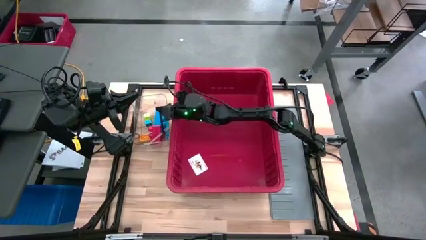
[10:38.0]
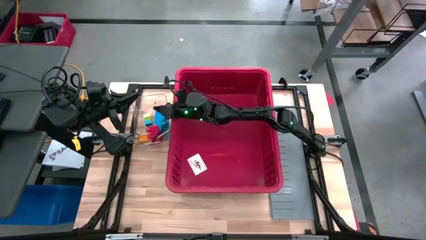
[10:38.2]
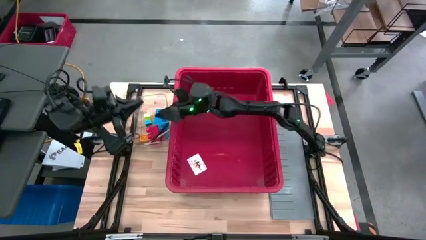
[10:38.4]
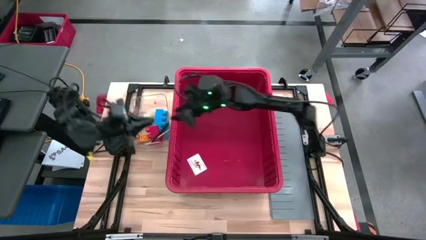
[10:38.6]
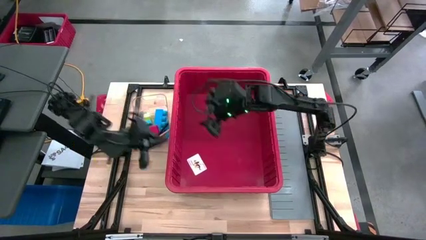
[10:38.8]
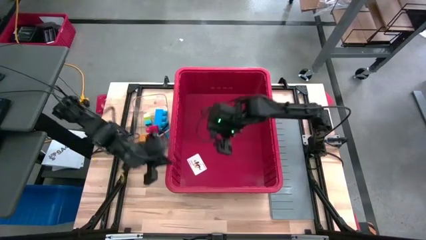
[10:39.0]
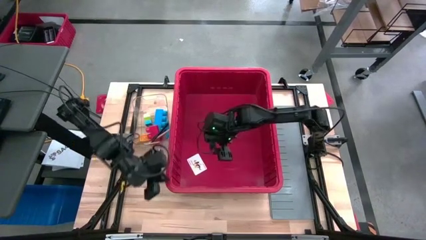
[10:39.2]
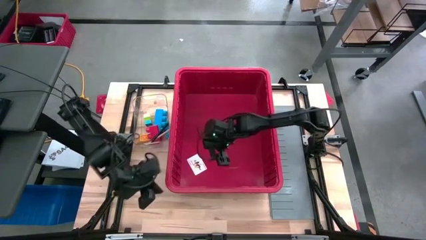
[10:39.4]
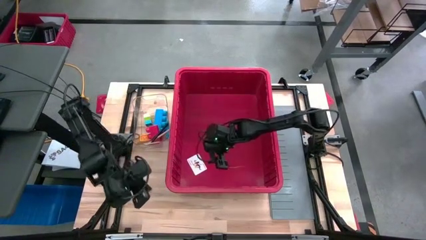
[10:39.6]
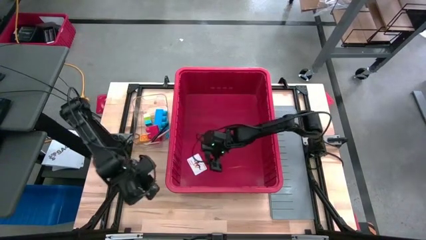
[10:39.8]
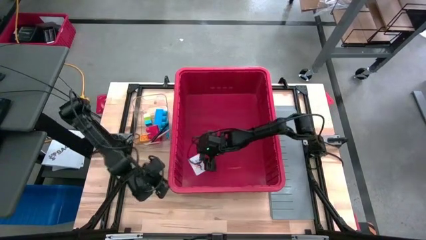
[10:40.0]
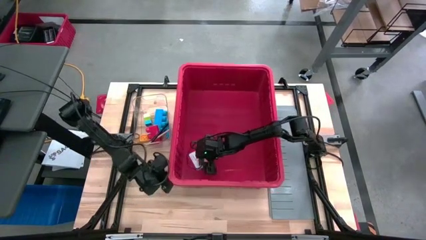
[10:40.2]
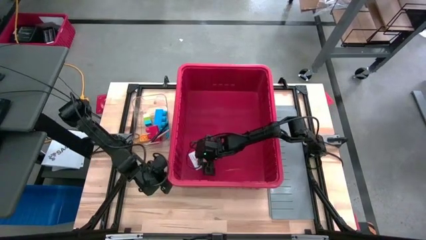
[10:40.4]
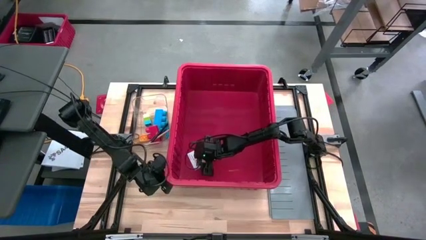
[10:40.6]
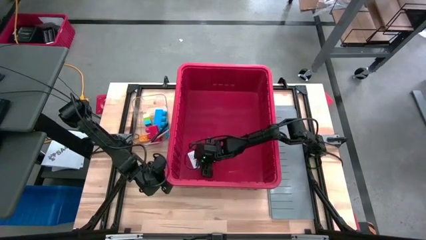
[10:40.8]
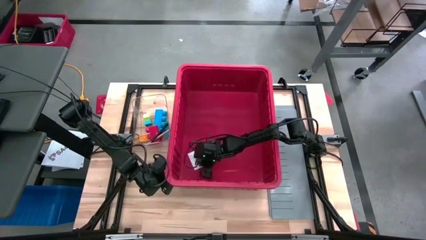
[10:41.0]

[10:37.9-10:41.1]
Task: Sort blocks
Remove the game card from the bin

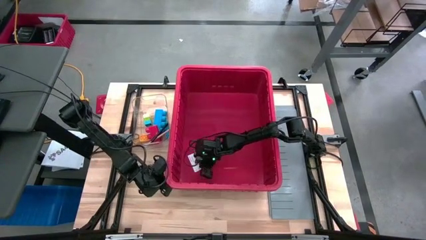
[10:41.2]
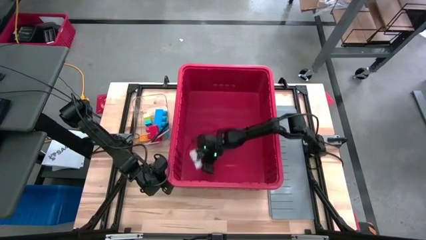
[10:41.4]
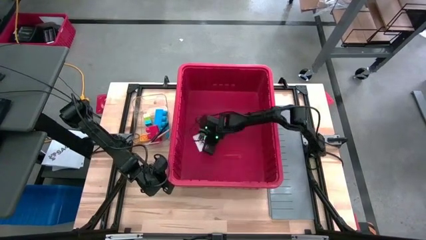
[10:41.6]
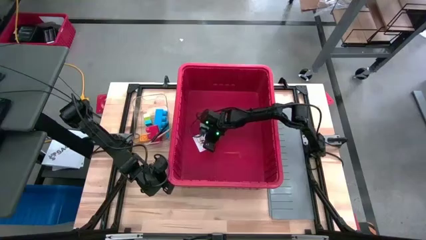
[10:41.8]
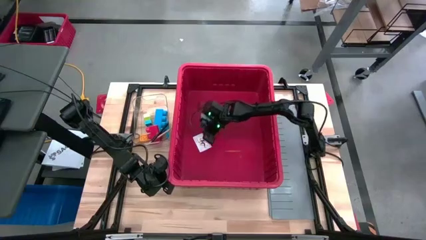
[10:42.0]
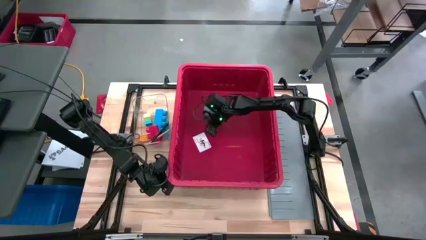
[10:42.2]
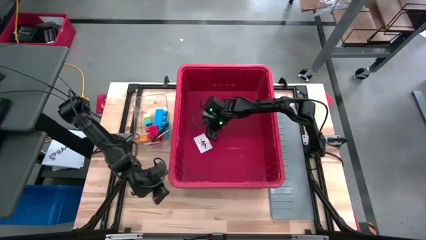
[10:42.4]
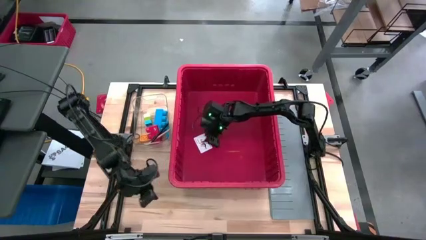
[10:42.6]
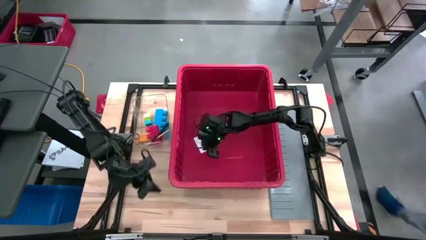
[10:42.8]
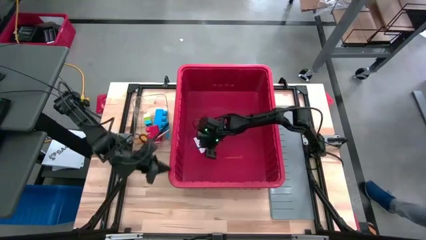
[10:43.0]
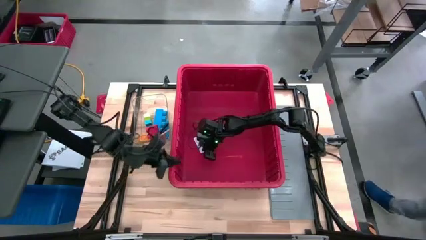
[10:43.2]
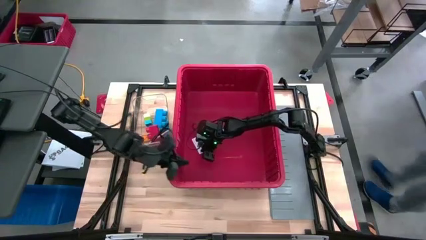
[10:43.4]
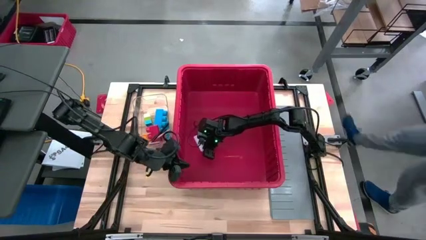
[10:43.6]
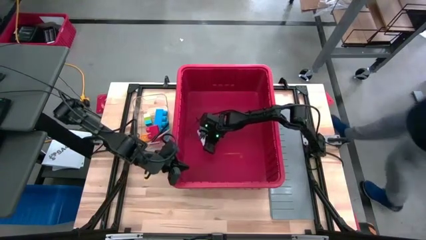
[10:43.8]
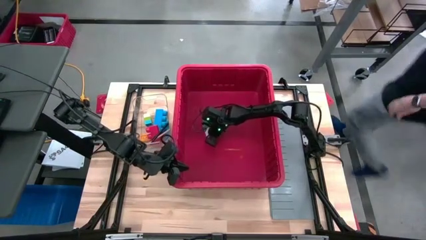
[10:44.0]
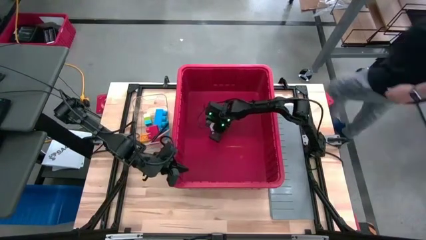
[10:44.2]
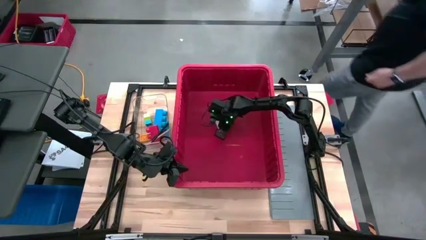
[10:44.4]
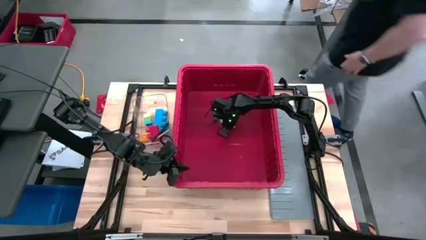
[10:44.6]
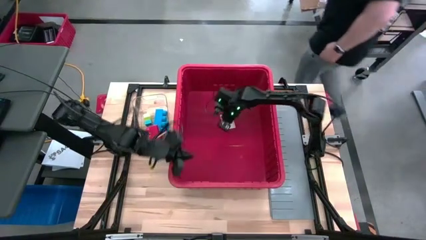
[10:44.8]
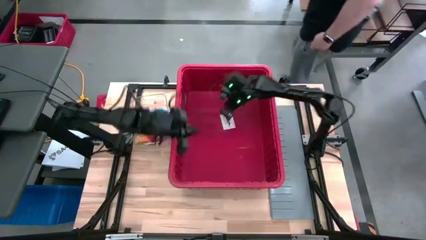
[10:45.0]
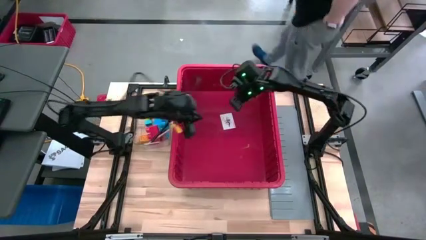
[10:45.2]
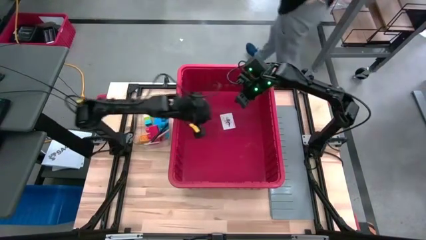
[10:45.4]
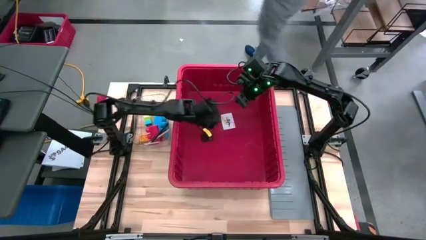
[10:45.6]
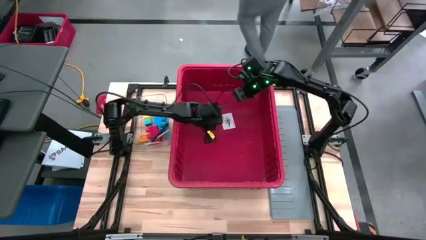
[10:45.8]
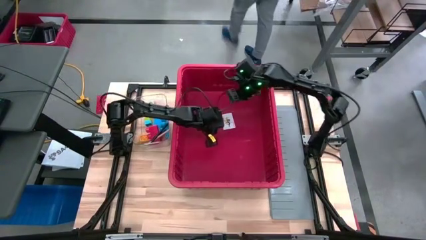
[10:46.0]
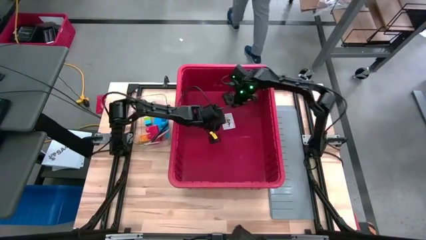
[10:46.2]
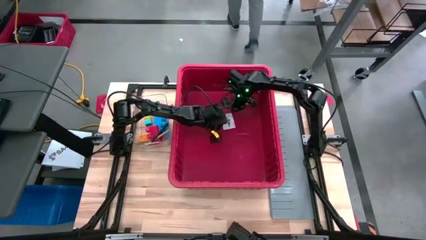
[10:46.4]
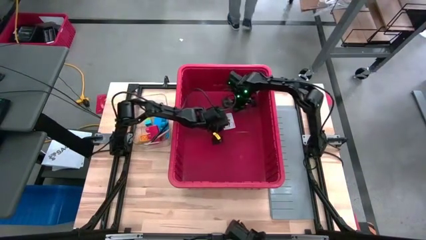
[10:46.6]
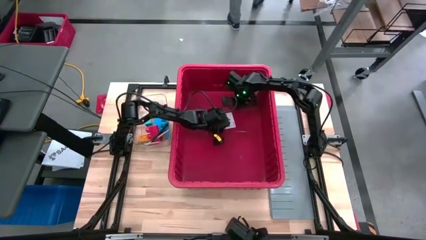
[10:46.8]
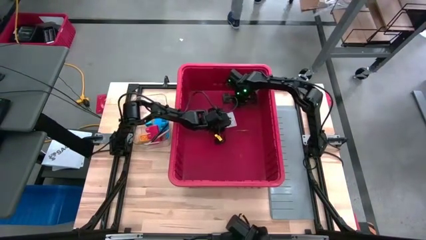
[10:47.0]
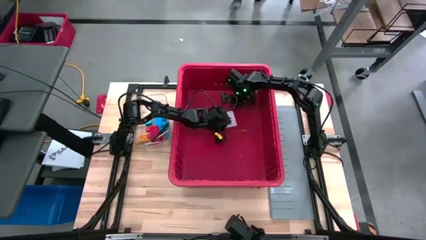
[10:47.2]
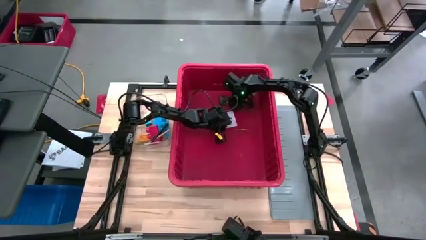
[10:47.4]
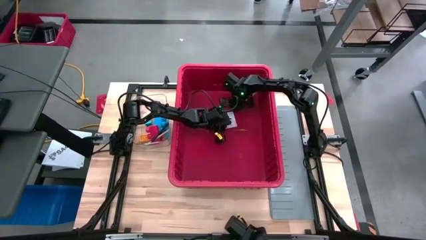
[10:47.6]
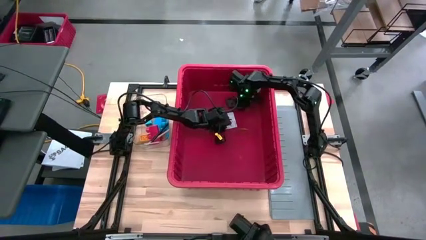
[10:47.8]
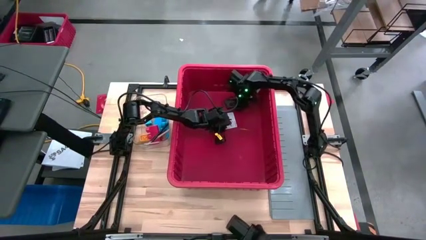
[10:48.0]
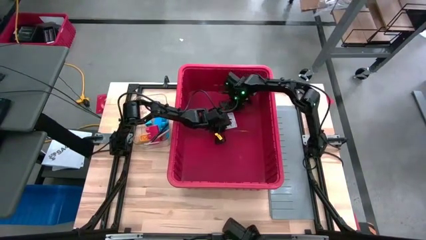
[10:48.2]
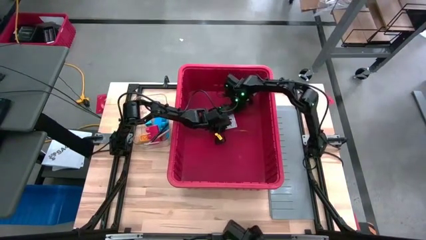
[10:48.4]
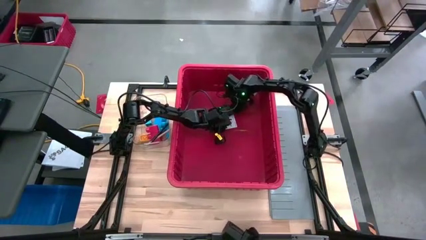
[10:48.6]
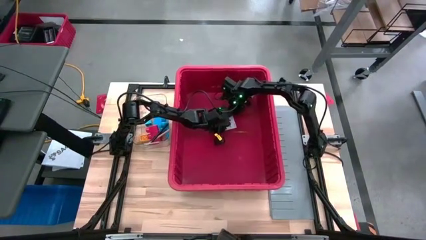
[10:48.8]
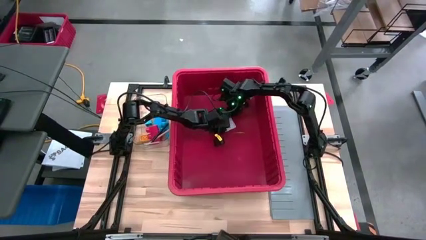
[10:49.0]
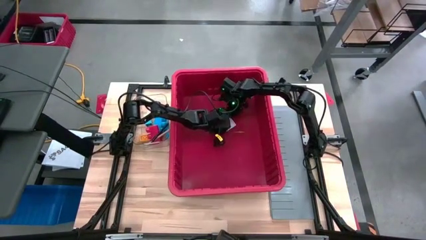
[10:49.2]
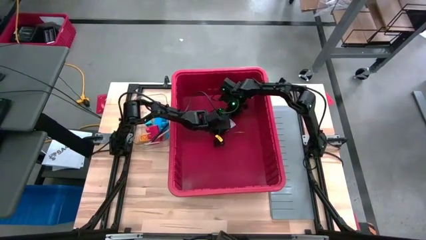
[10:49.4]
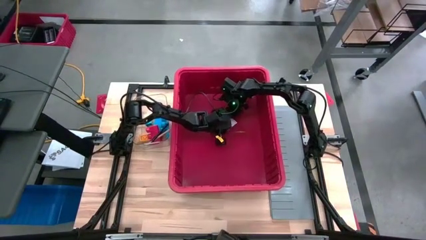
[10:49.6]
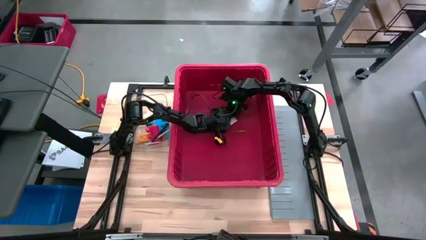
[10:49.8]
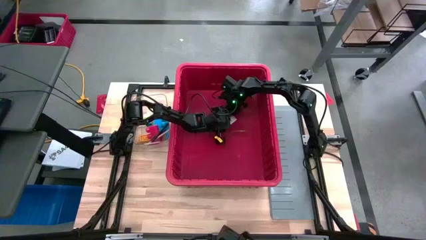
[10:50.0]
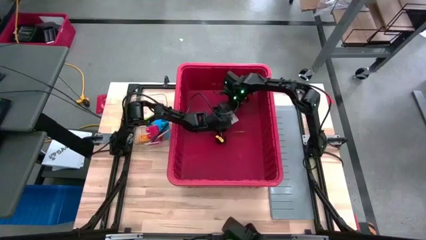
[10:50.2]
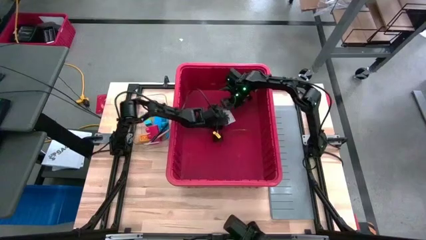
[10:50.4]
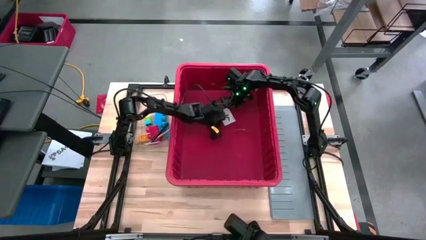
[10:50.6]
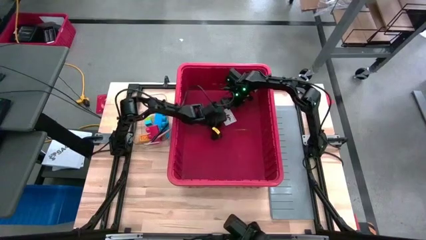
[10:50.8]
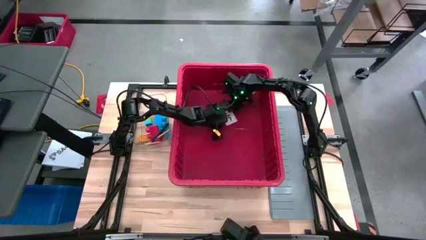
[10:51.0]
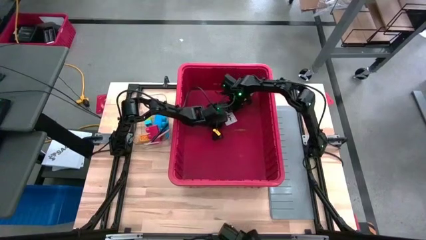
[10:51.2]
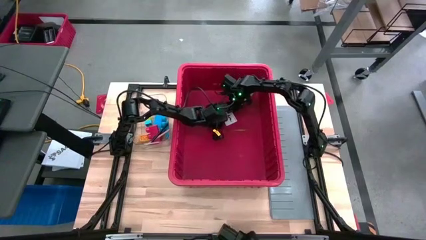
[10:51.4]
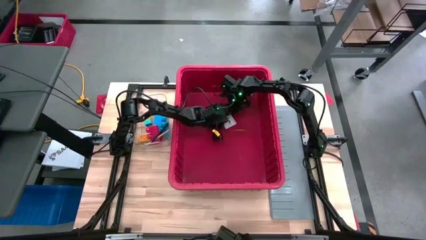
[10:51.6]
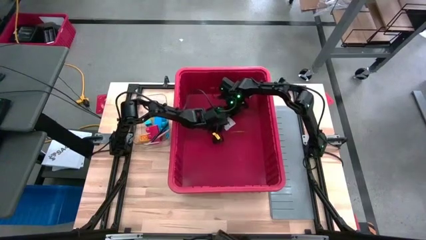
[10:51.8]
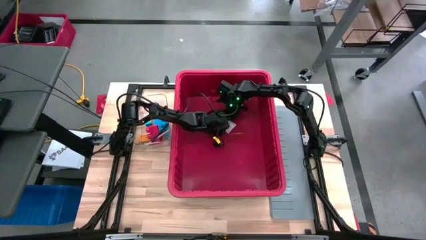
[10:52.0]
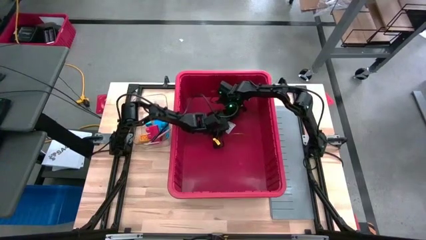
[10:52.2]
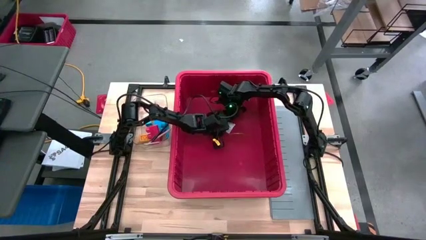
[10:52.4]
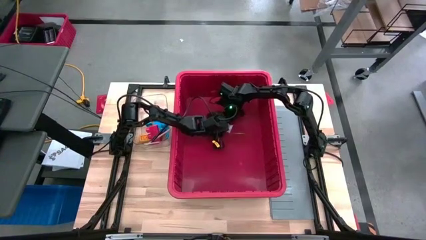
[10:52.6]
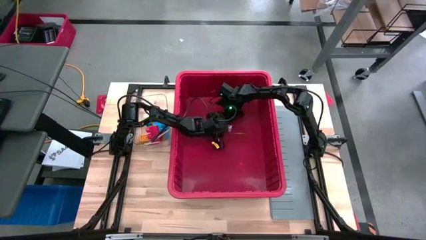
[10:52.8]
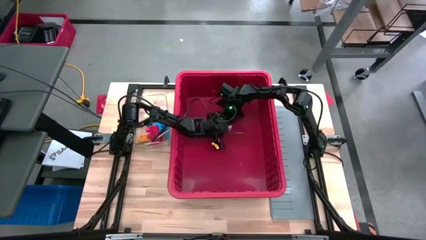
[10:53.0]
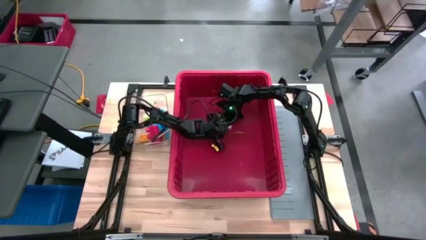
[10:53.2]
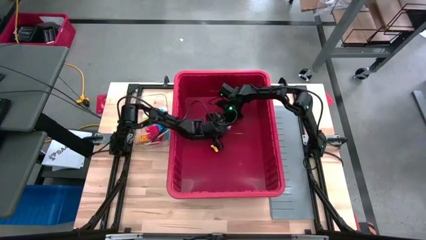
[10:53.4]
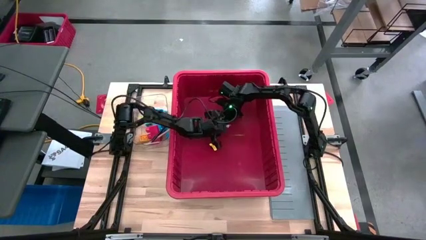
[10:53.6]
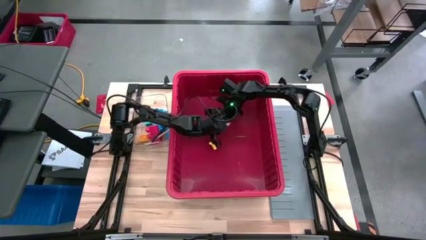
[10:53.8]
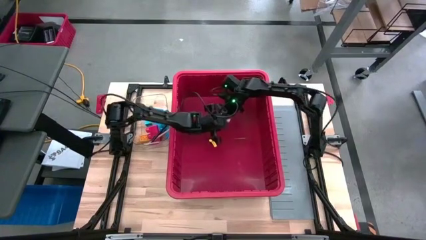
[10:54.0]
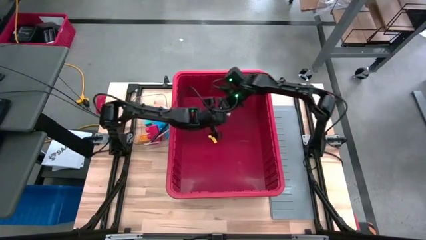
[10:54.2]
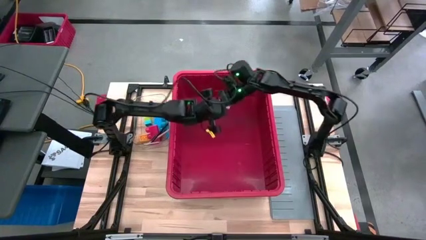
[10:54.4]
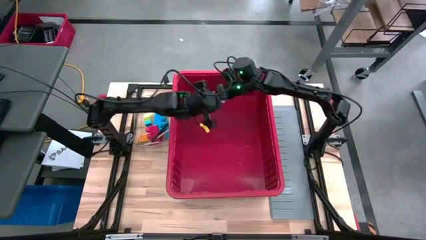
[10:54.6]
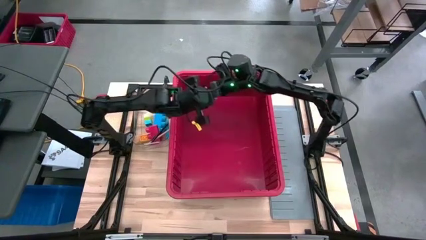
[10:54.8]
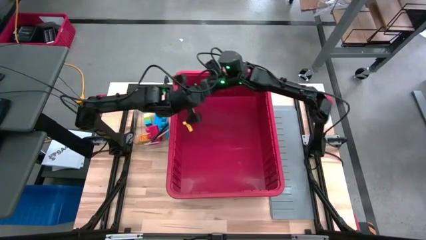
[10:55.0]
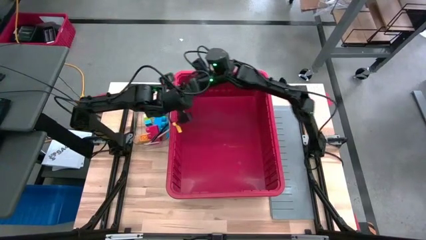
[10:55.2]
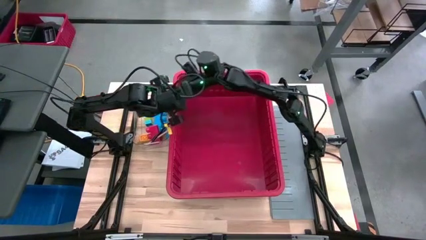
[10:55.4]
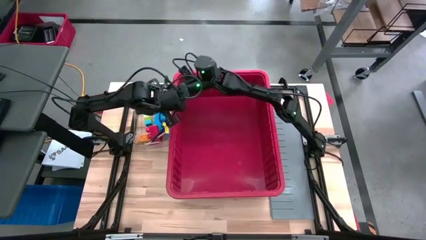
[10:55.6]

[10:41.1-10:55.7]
Remove the game card from the bin
